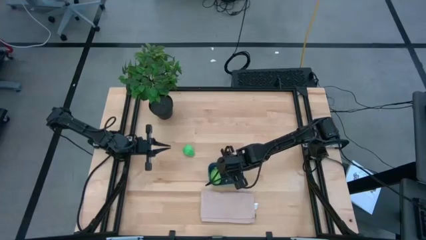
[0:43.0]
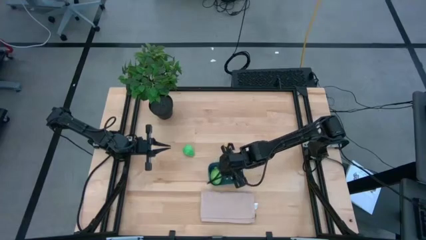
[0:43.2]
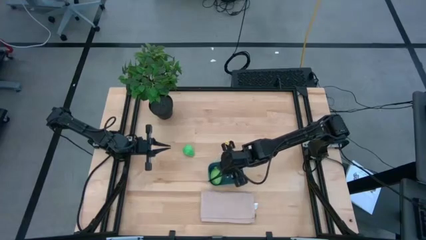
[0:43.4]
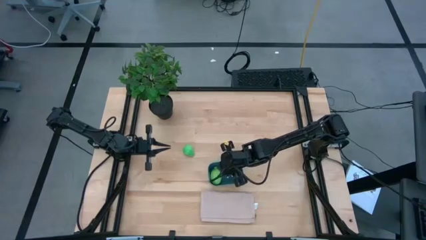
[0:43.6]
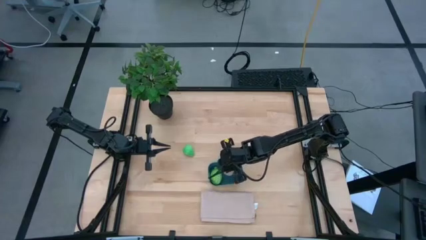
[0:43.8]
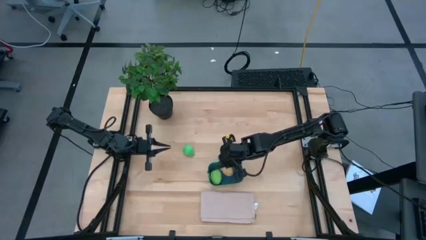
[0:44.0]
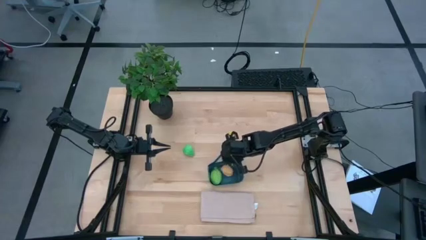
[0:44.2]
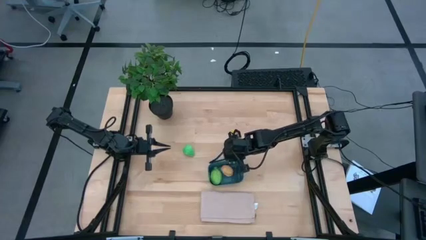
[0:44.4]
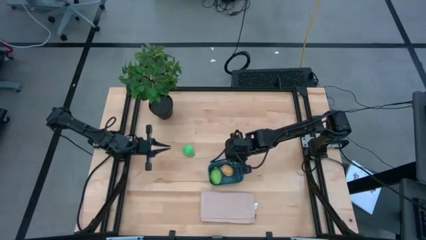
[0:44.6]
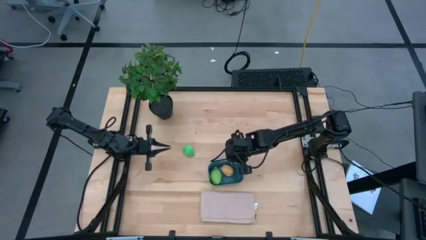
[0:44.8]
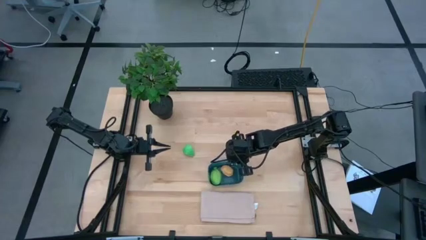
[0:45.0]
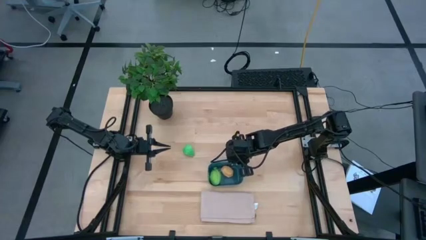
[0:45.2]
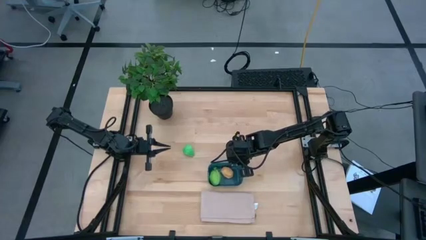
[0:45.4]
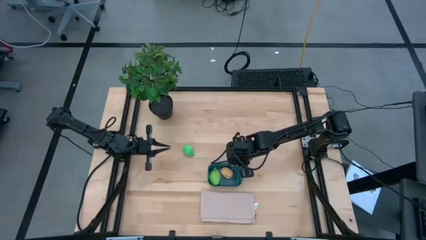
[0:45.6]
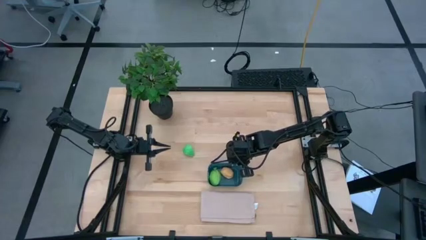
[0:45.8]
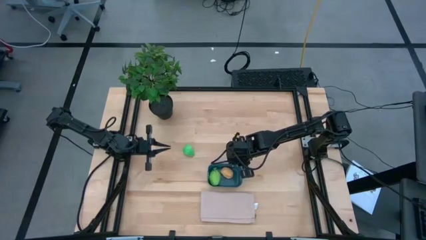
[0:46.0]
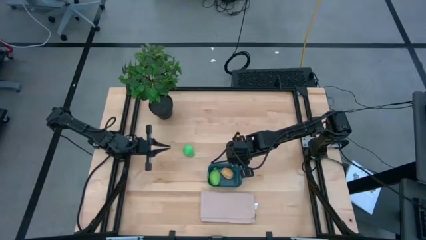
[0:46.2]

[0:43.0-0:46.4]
Task: Pick and placing Produce into tupperware
Adjust the blue bin

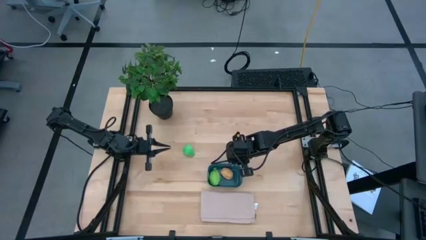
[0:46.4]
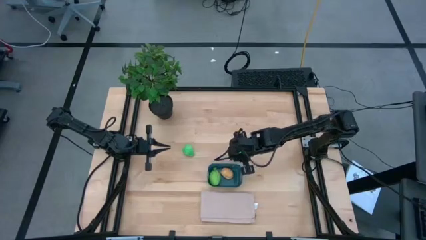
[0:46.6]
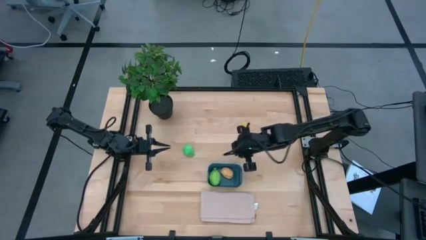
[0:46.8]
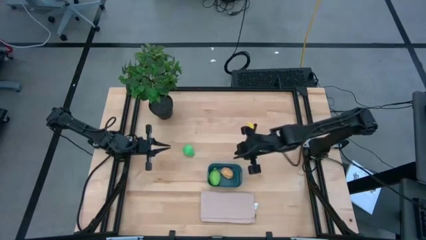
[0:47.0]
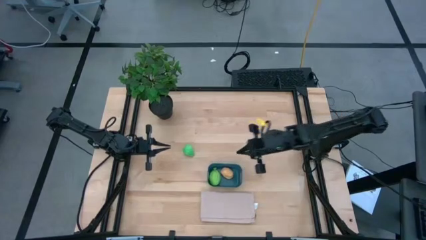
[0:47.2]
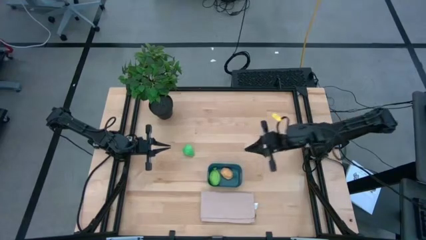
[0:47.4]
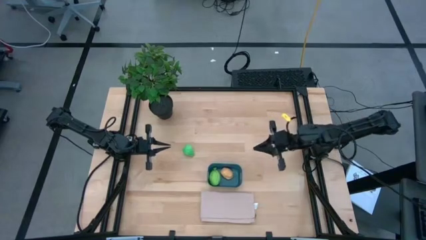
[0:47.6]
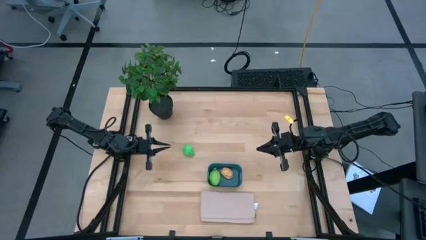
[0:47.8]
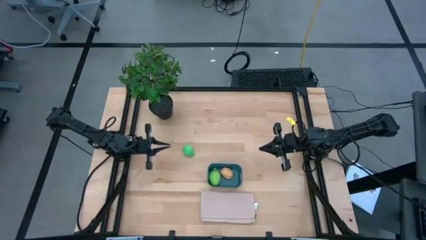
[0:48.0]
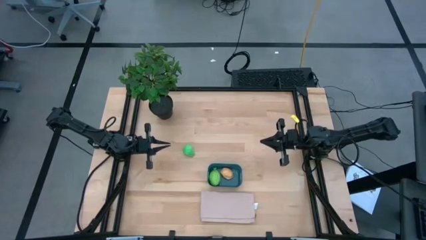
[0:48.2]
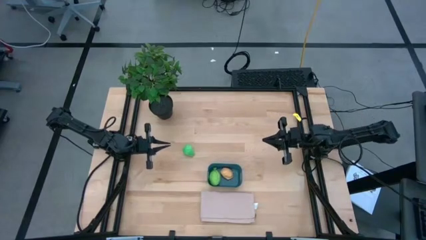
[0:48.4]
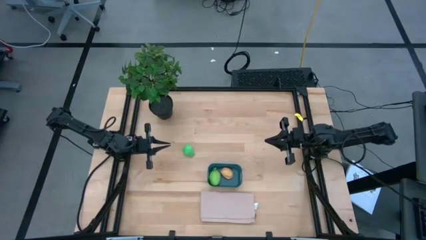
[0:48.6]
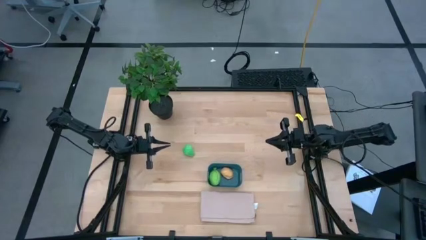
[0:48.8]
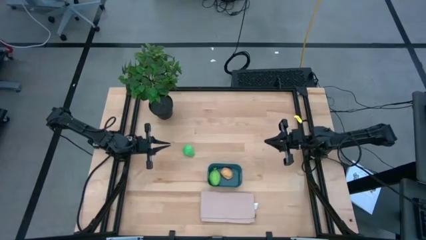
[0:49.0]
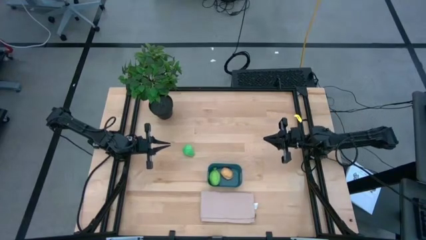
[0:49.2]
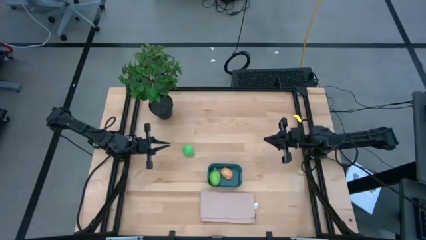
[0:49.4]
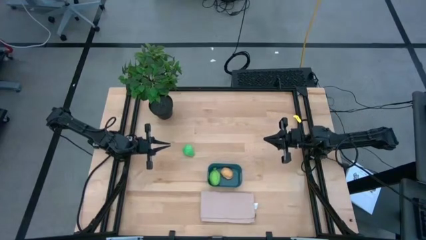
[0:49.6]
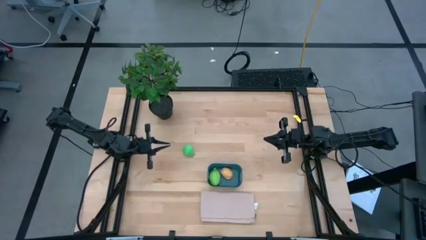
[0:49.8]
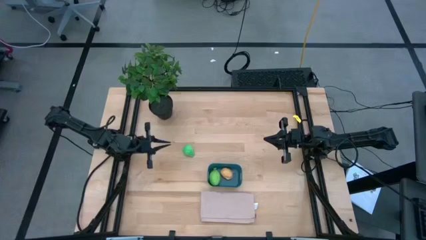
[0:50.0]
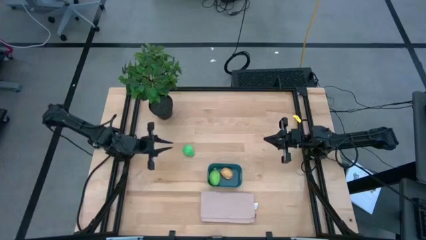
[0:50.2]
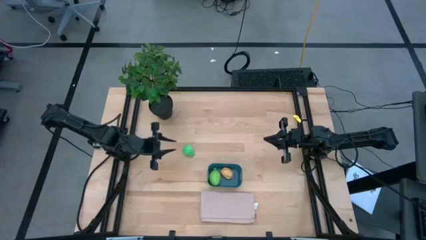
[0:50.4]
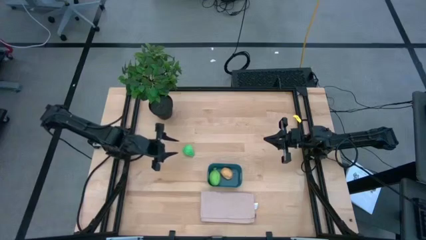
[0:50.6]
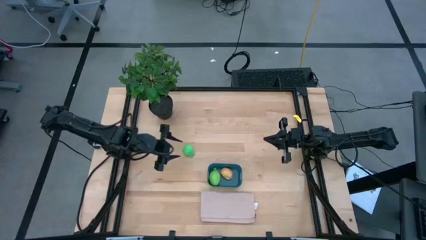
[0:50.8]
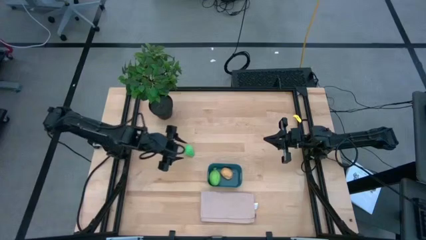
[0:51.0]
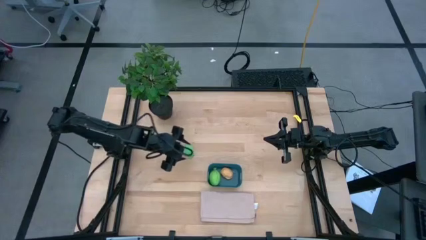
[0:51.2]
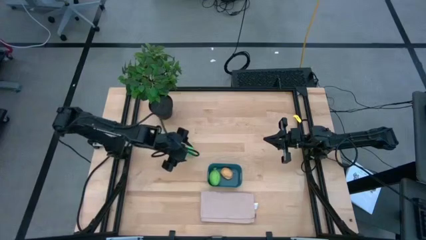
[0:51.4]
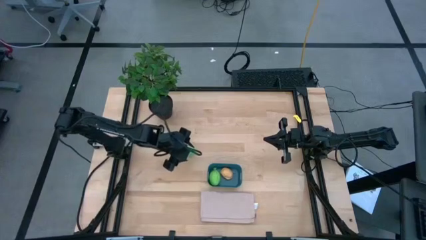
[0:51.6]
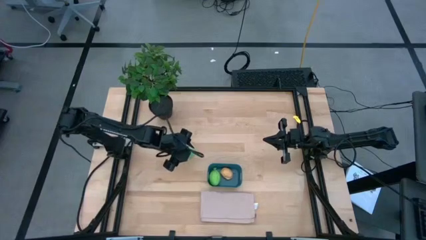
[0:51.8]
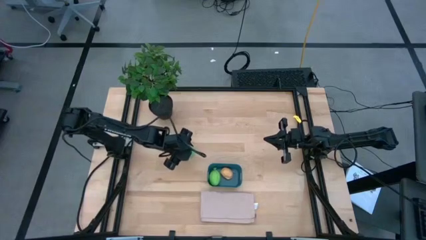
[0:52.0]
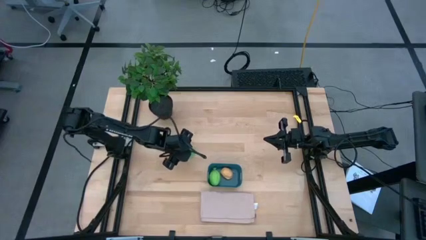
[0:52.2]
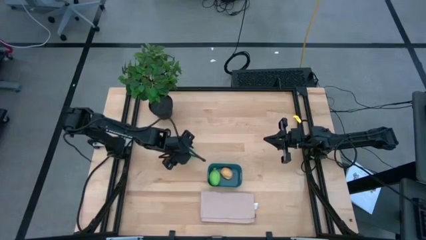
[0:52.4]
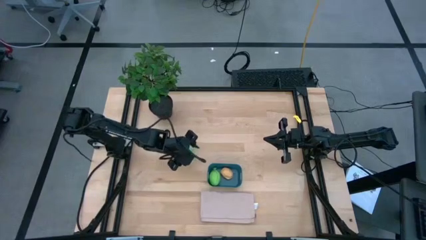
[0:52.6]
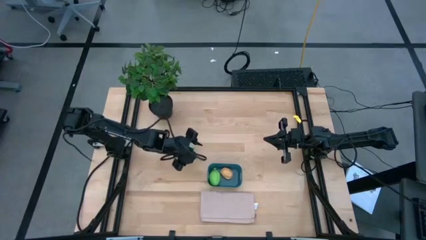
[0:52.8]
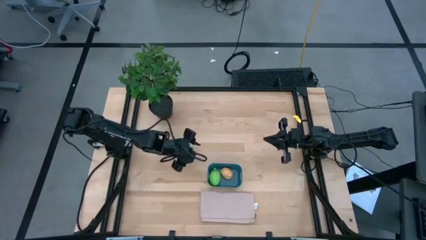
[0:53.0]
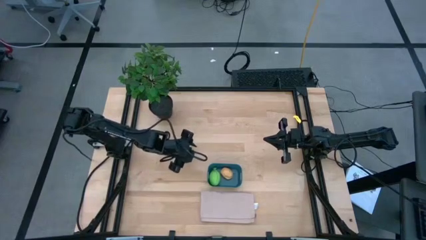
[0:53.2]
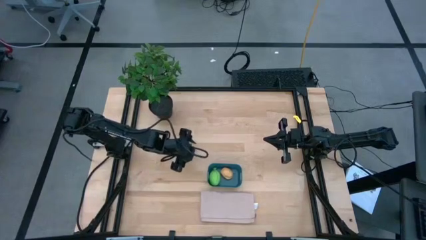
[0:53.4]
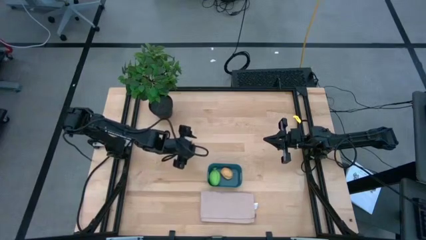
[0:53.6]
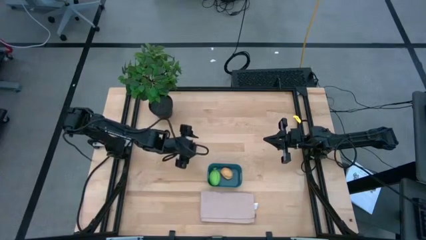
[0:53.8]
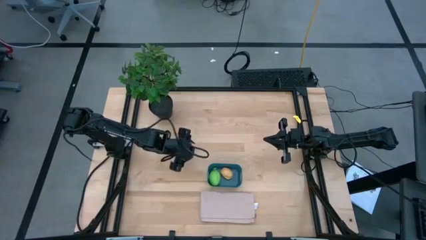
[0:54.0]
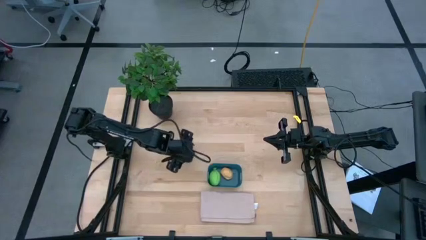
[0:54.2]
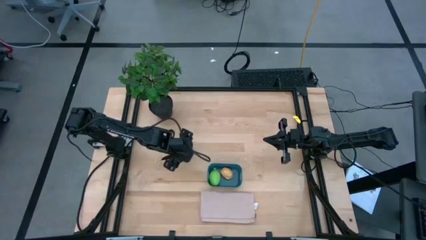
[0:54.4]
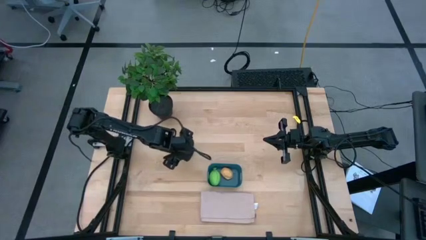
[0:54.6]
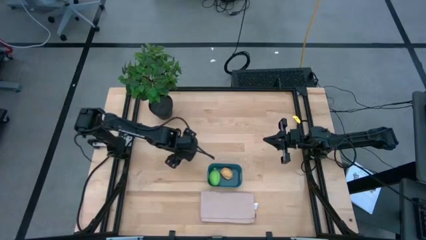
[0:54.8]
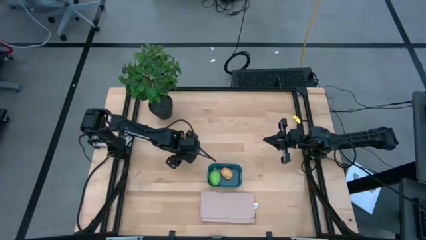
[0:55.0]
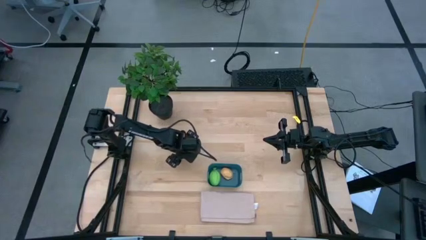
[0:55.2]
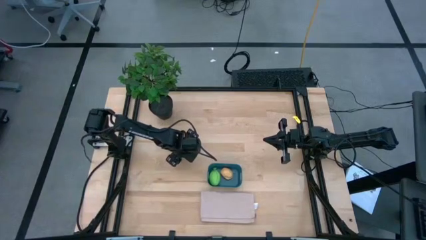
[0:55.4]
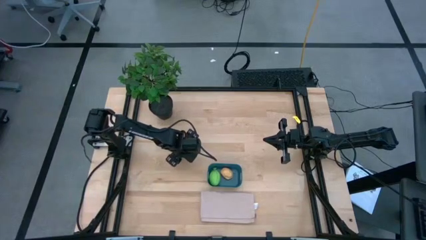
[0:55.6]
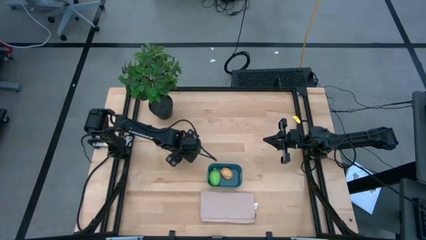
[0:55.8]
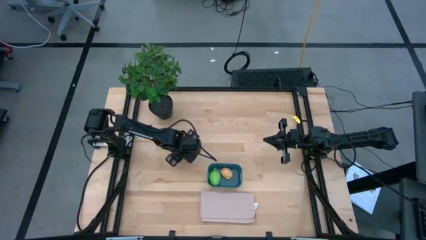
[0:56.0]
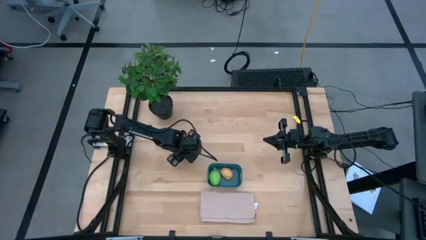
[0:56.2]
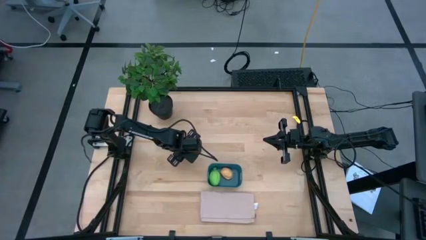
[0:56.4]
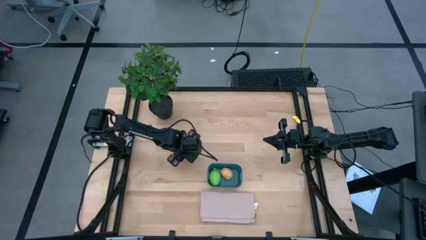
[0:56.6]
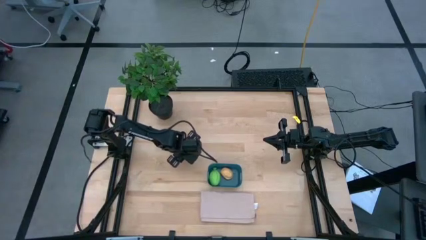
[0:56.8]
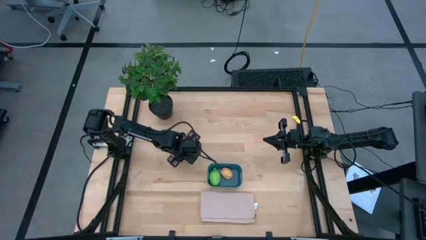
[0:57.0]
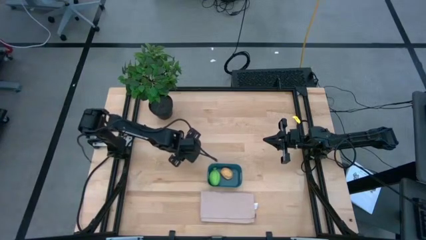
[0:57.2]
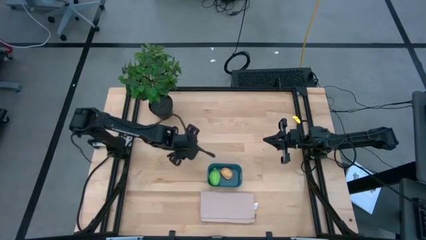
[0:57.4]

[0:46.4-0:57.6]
Put the green pear into the blue bin

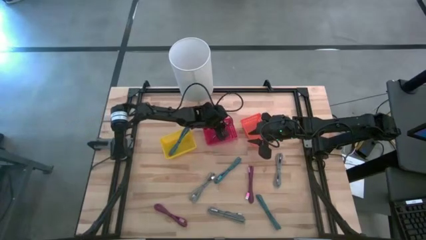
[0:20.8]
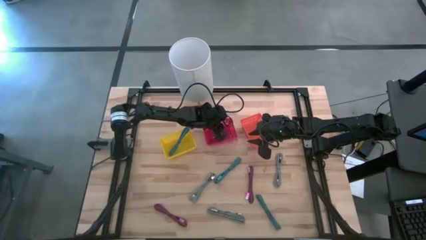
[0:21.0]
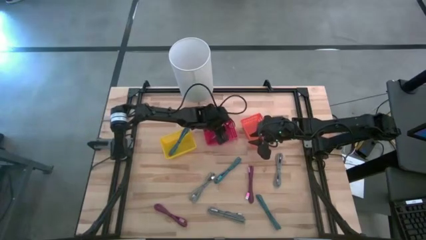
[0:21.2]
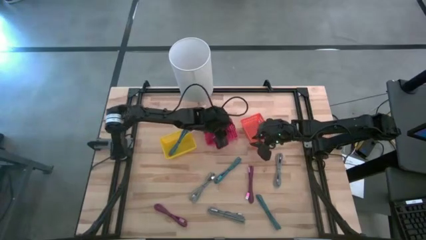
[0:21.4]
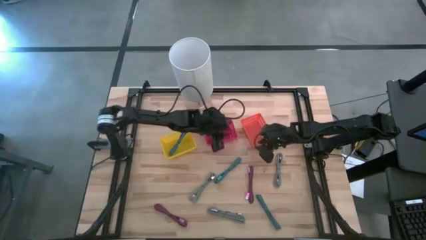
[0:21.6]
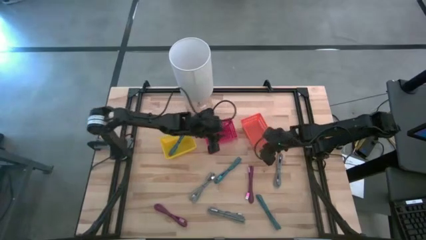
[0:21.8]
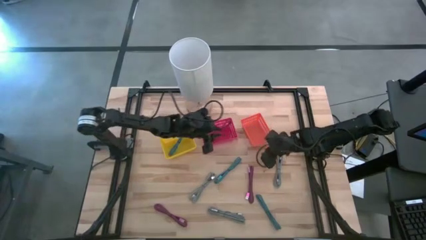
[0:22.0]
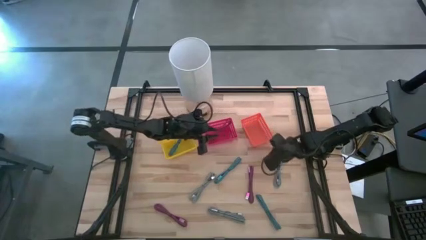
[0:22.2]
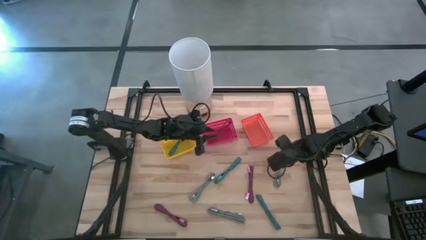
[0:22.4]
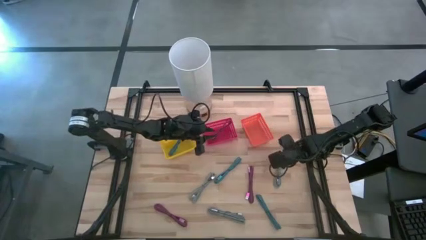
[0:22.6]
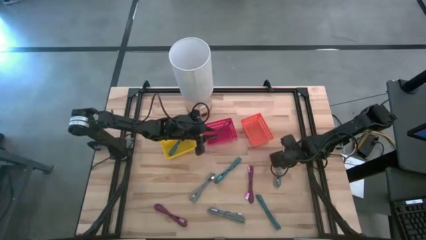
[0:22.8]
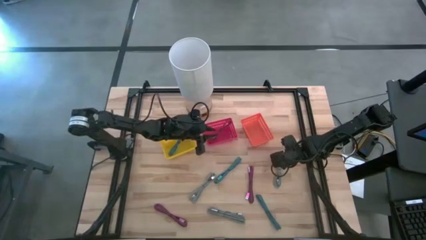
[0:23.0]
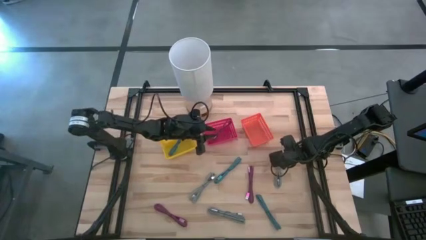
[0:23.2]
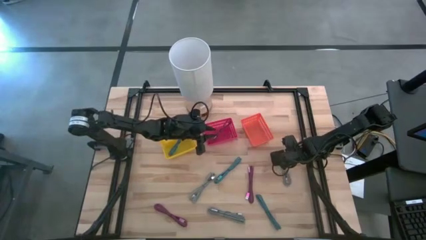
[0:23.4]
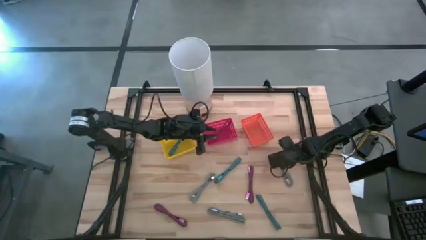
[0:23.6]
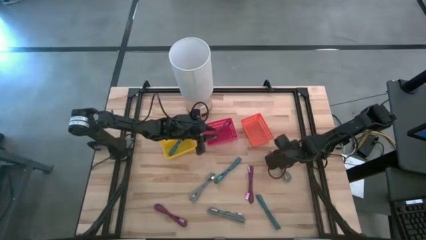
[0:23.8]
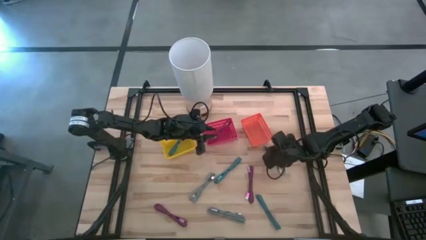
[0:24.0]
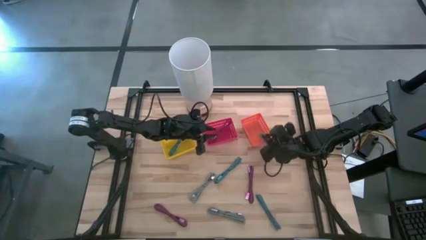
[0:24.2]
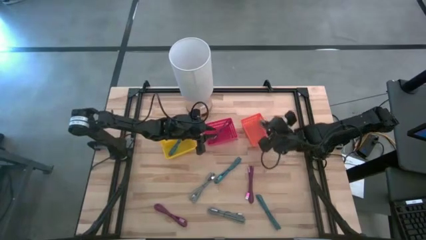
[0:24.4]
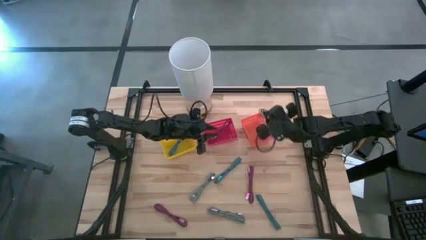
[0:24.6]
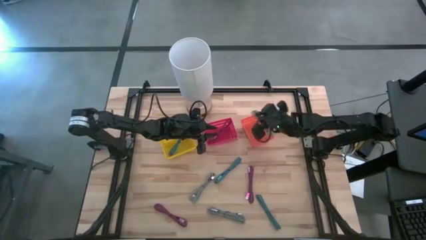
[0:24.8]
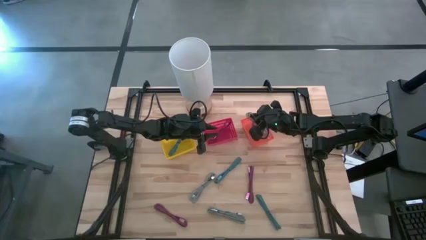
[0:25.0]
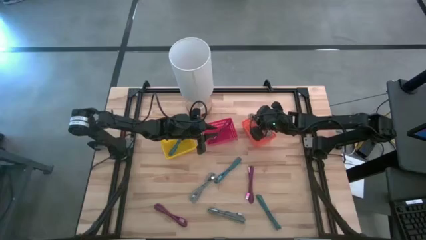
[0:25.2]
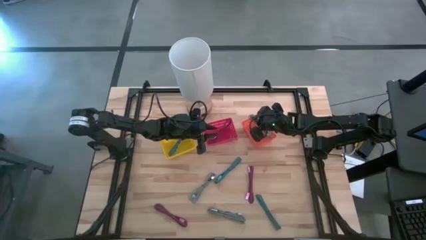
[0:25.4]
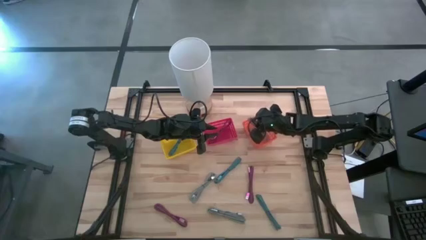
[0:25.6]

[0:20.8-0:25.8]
Task: Pick & Place USB Port
Put the top right black and white charger cable into the orange bin
